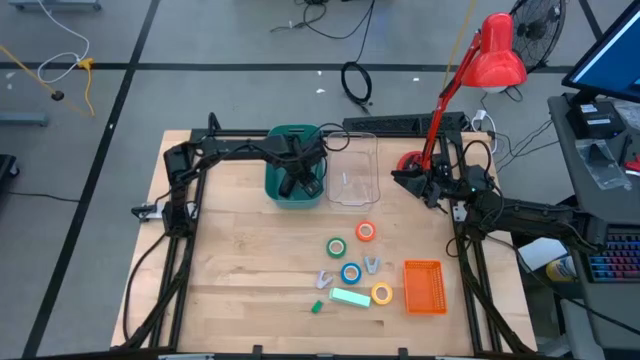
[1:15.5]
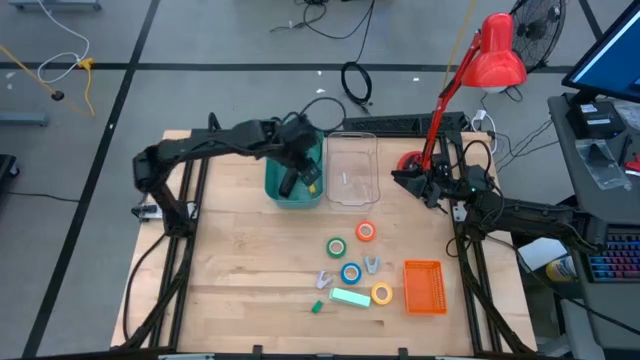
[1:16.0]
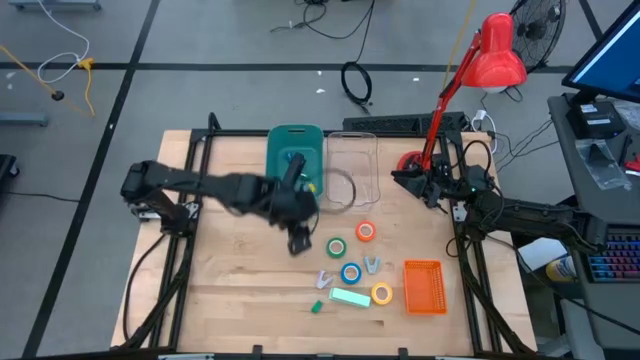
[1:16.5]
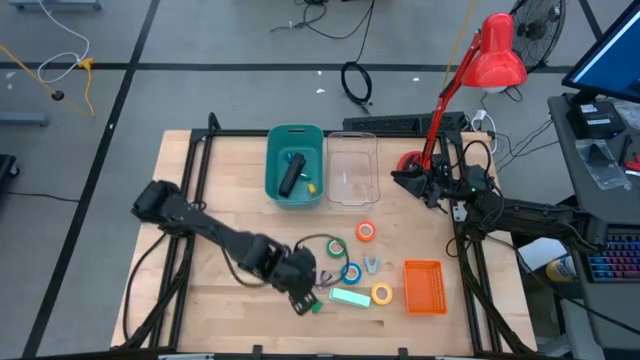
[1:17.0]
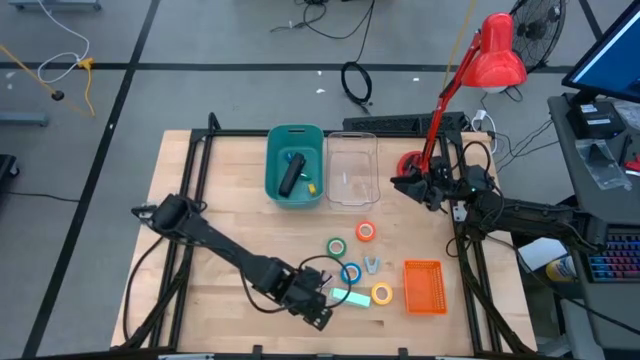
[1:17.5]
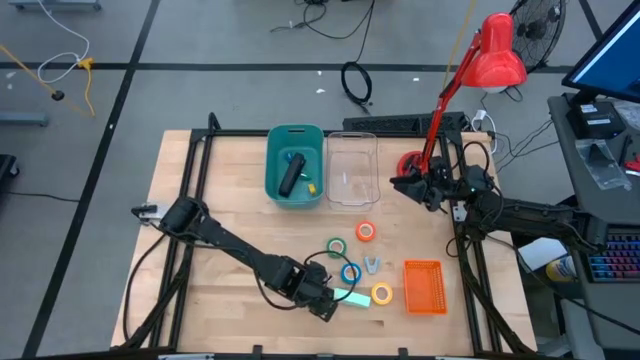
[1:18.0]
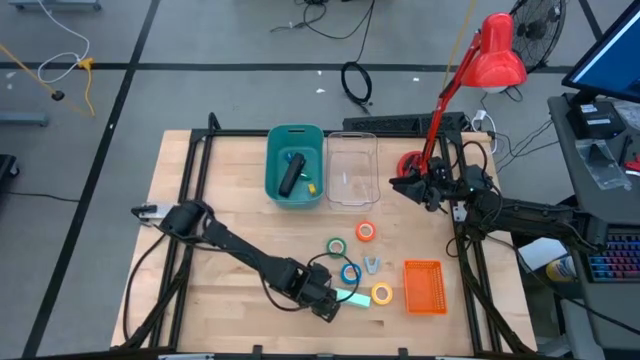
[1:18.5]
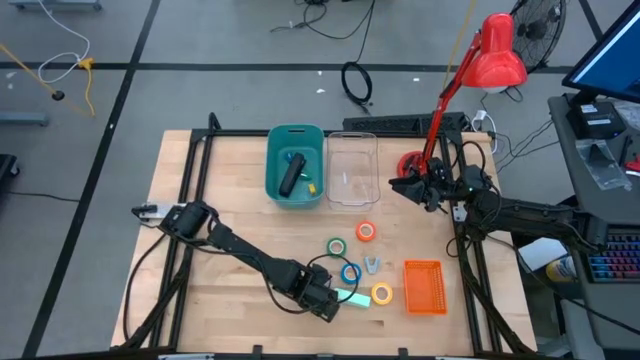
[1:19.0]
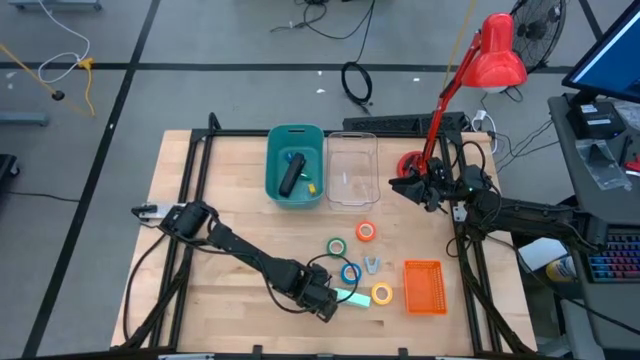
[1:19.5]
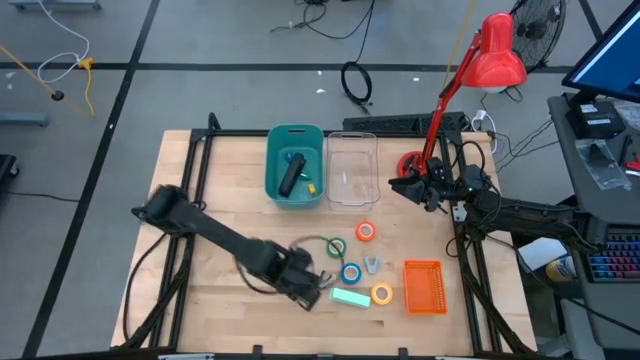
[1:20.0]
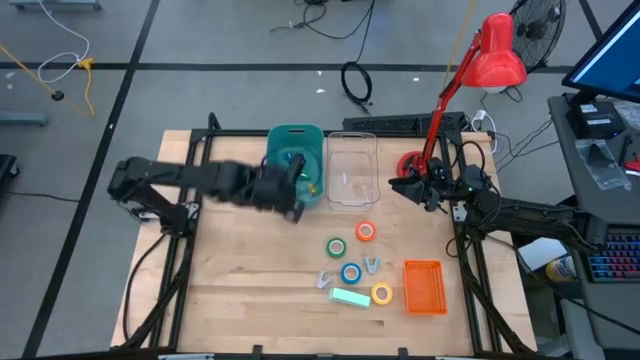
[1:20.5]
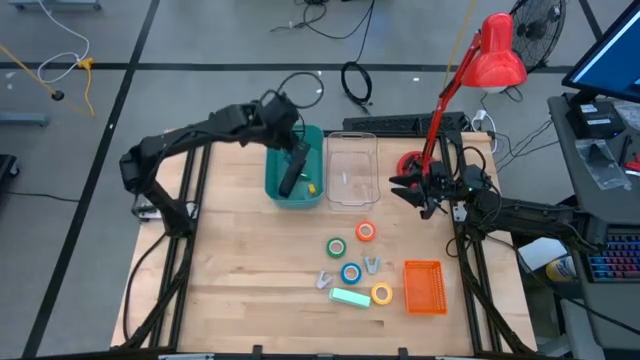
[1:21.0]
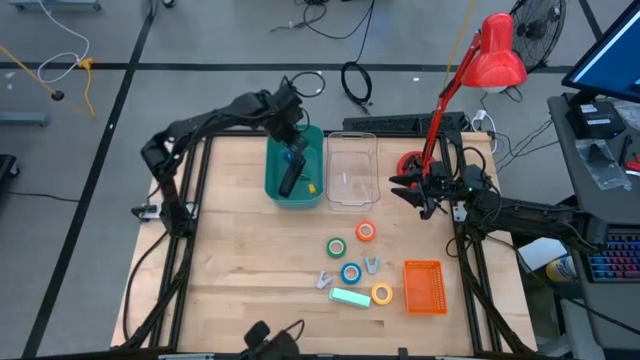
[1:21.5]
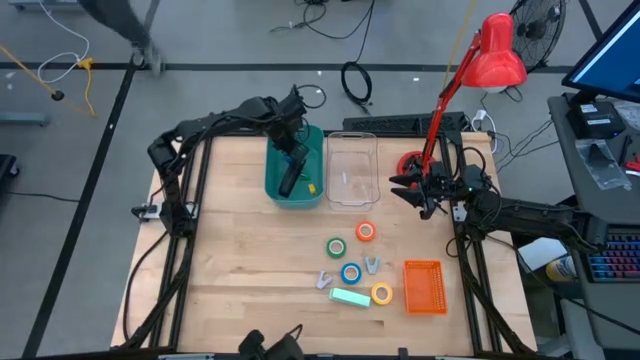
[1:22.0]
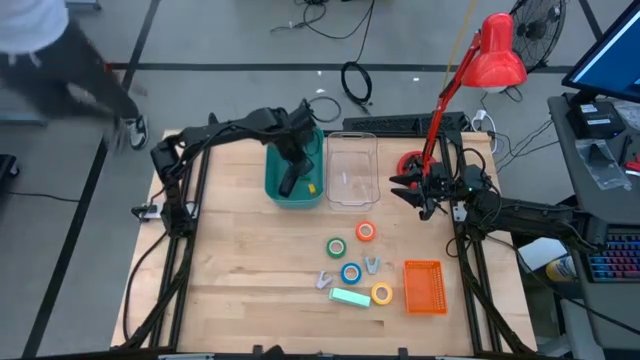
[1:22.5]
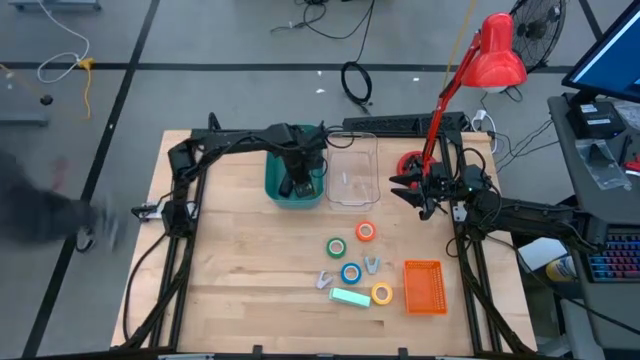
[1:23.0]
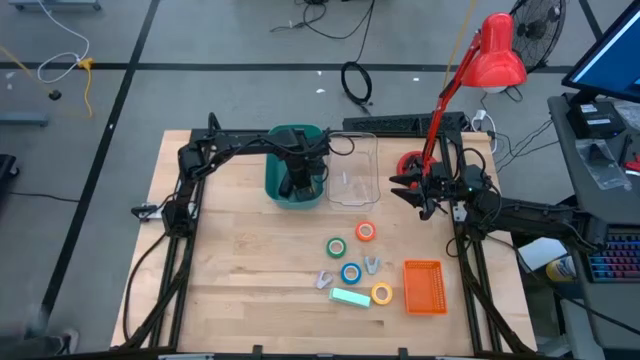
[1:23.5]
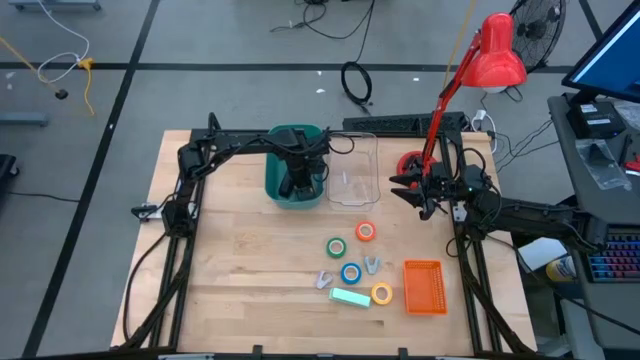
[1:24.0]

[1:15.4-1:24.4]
Task: Pick and place Stapler, Stapler remover, tape
Put the small green stapler into the green bin

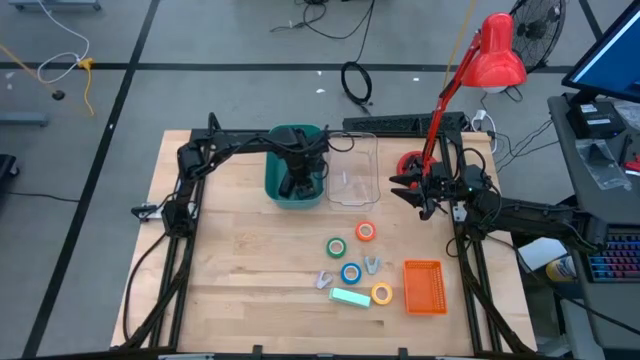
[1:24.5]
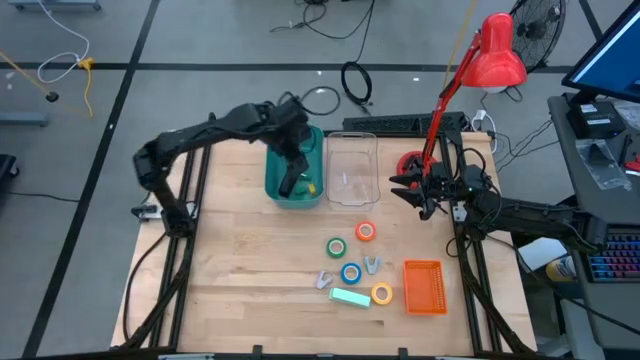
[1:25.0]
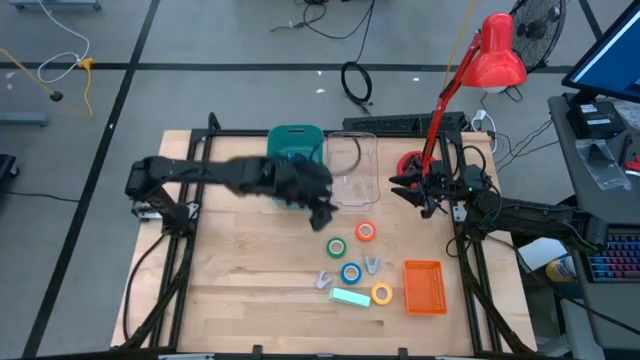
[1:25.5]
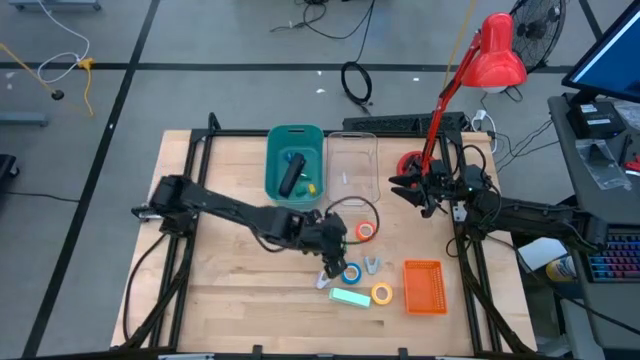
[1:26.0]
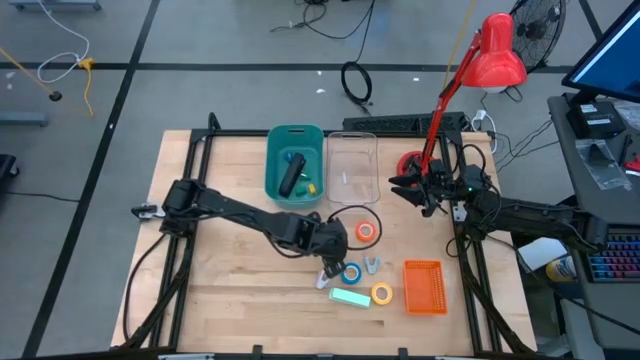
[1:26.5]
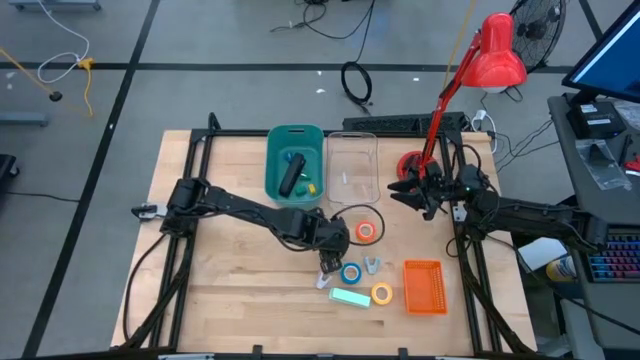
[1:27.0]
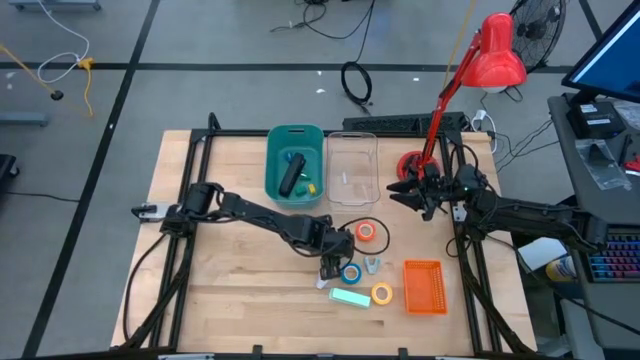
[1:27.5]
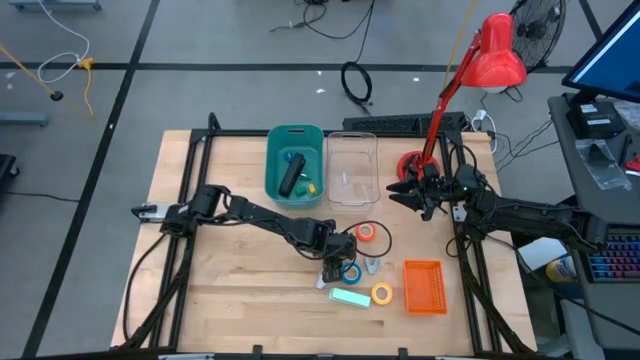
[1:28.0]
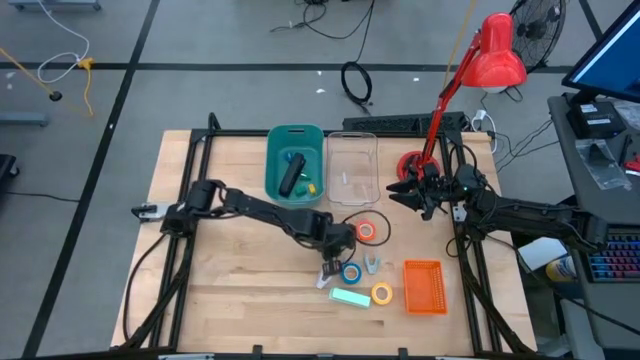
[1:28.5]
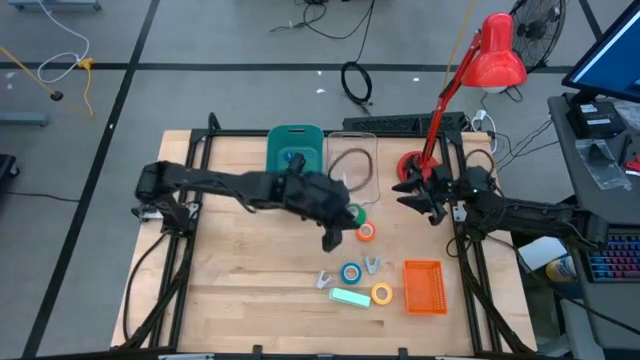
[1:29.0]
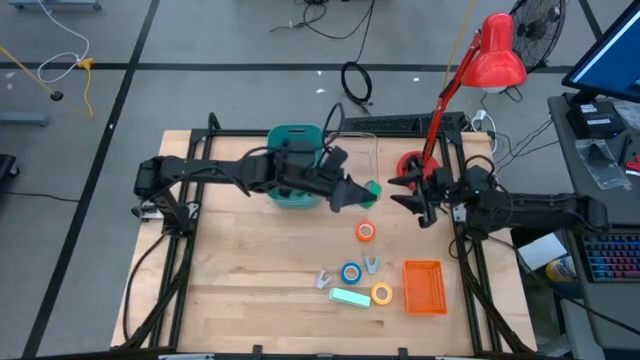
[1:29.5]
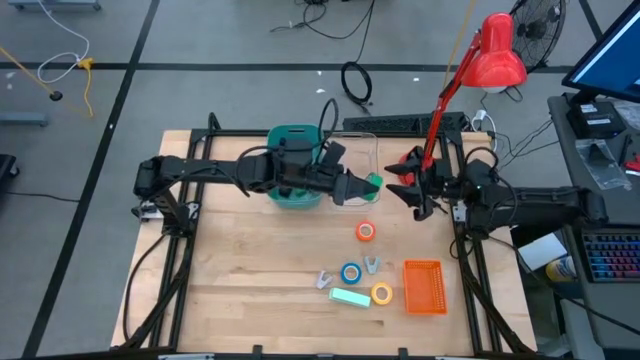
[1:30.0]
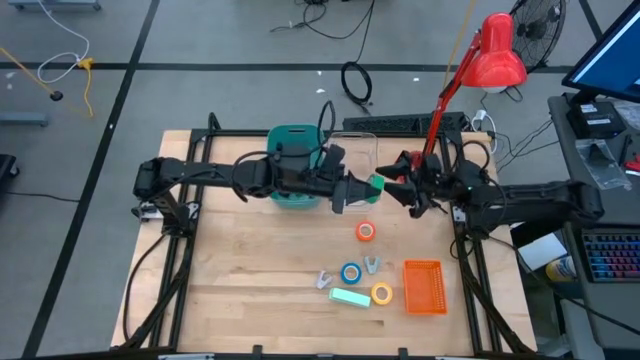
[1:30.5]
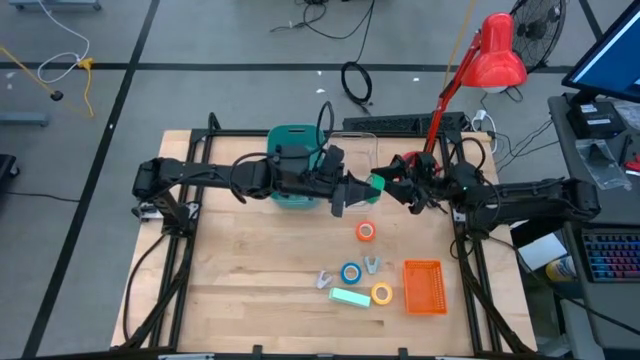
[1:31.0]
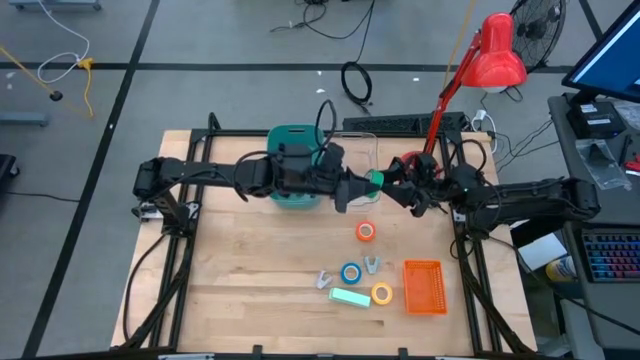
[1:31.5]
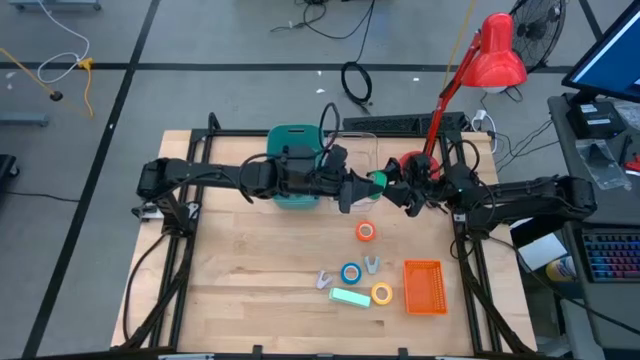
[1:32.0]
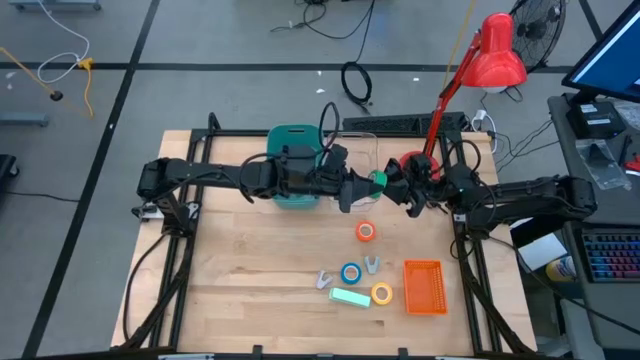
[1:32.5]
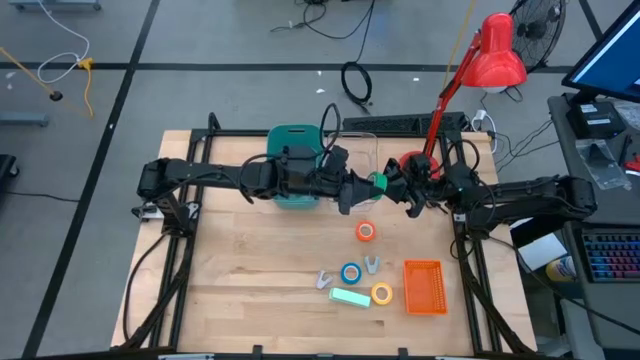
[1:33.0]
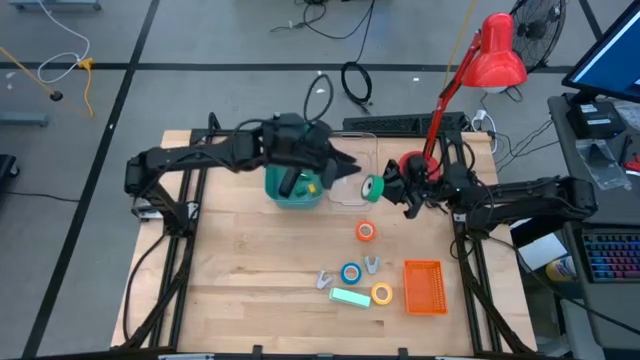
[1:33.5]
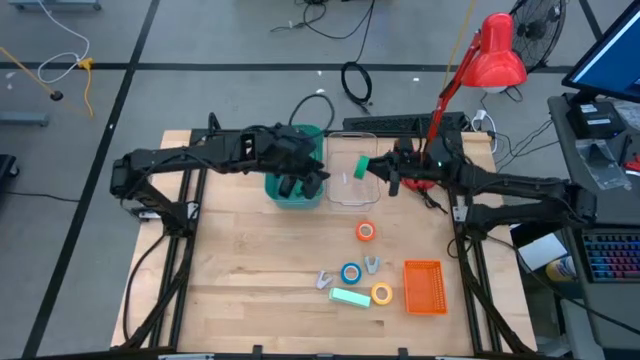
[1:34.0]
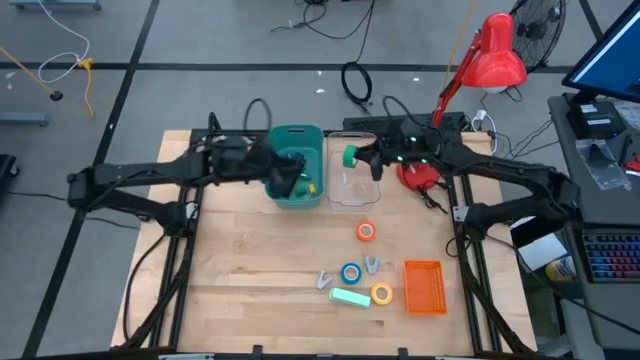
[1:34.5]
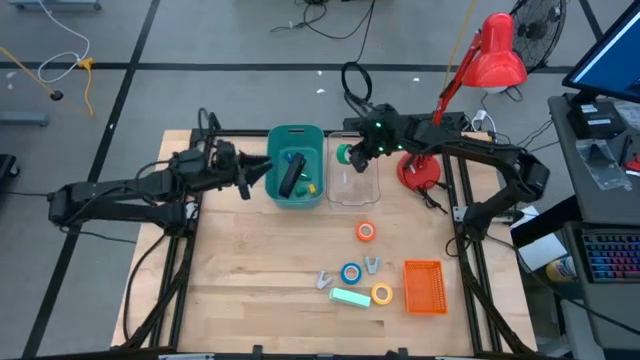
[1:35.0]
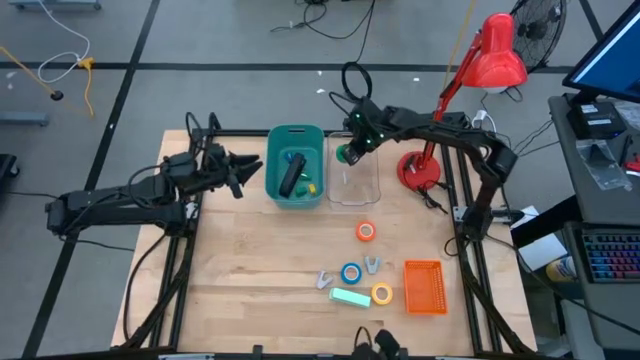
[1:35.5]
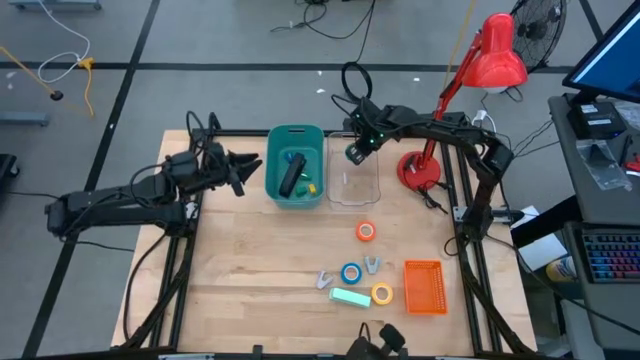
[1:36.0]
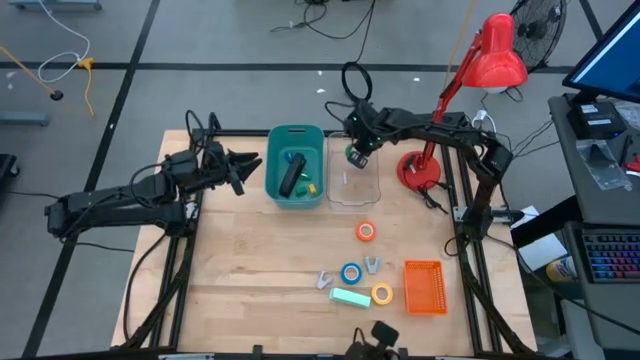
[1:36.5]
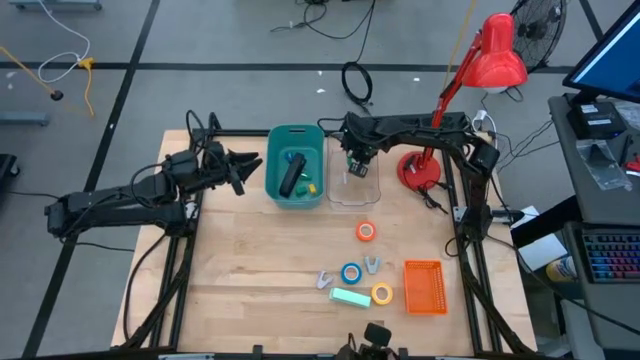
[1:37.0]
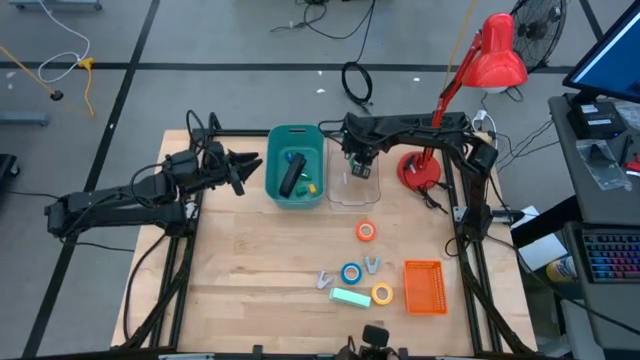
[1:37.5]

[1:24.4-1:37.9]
Put the green tape into the transparent bin
